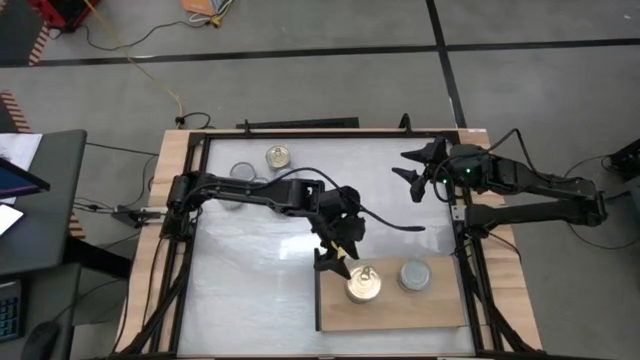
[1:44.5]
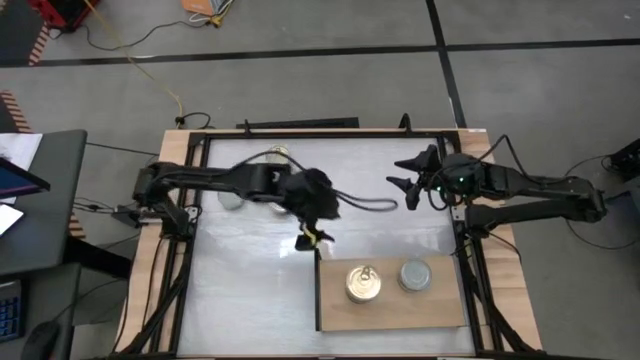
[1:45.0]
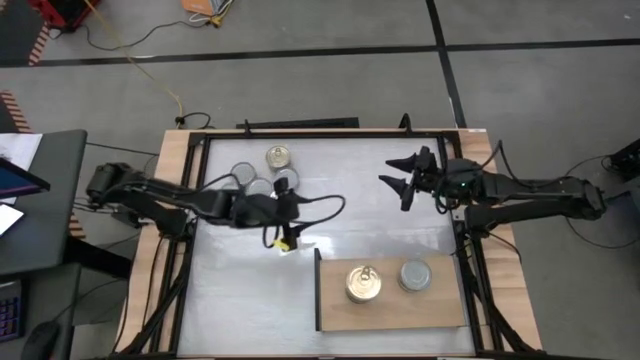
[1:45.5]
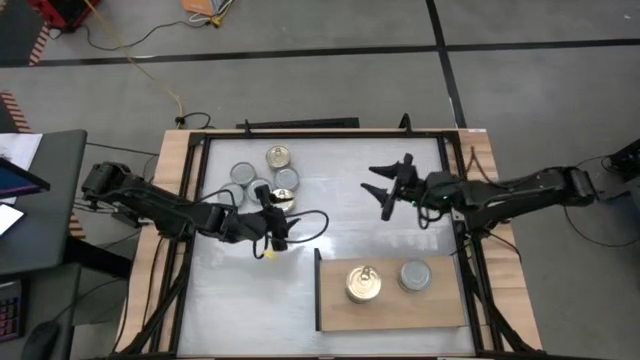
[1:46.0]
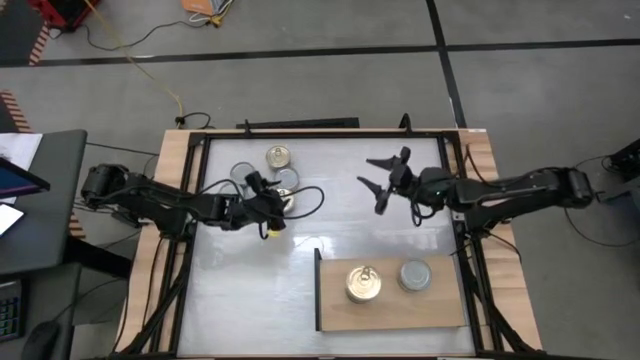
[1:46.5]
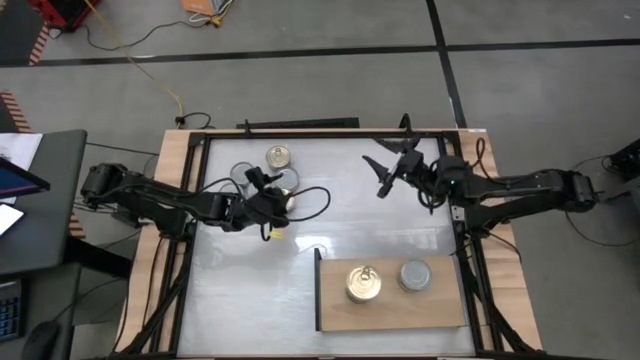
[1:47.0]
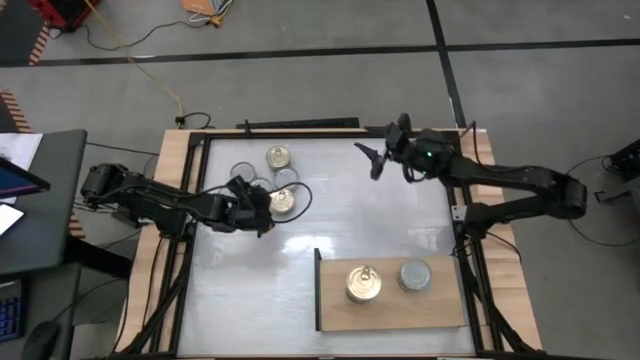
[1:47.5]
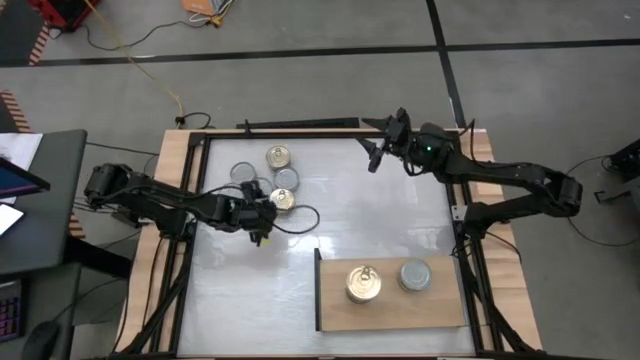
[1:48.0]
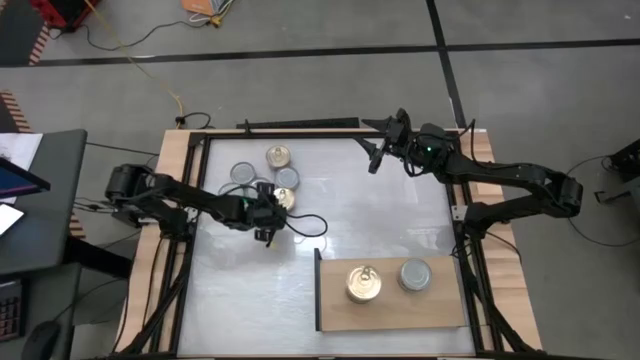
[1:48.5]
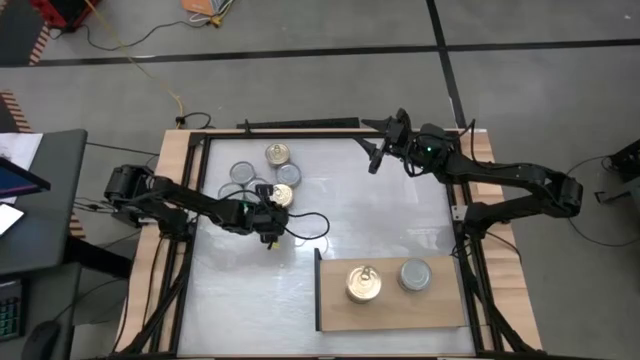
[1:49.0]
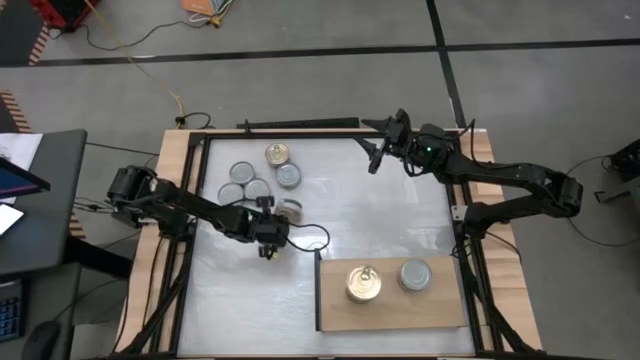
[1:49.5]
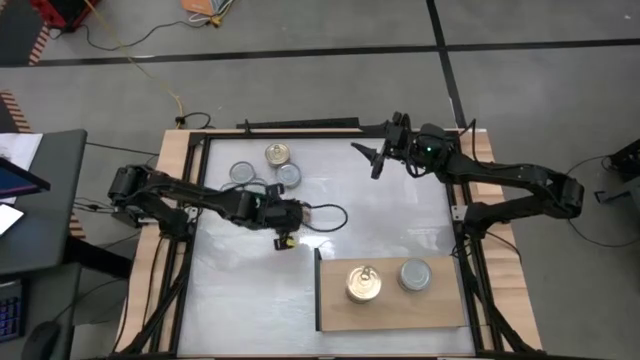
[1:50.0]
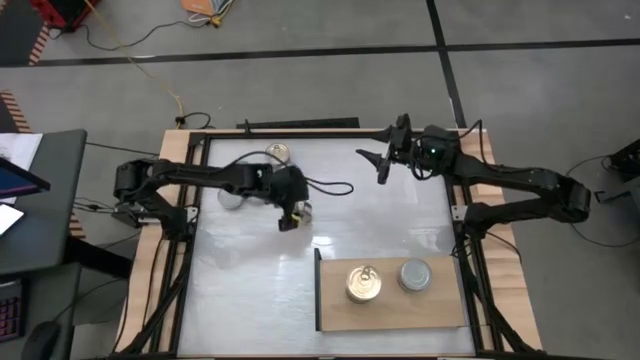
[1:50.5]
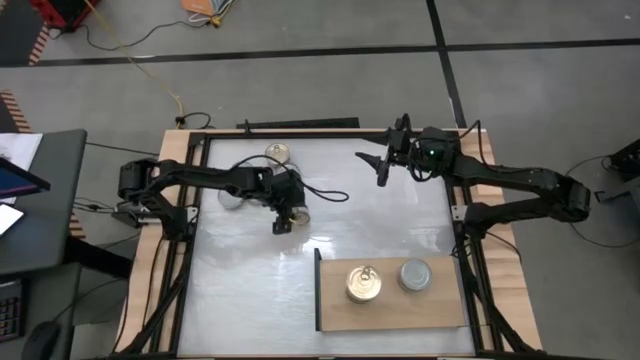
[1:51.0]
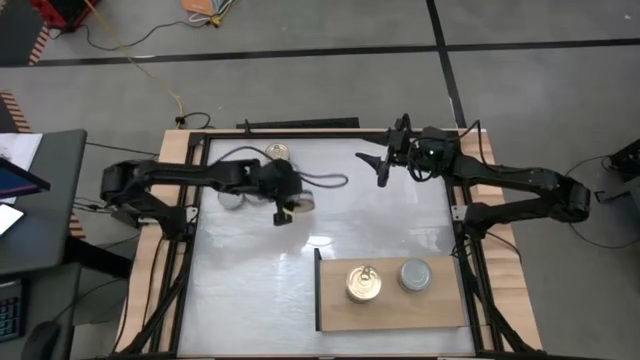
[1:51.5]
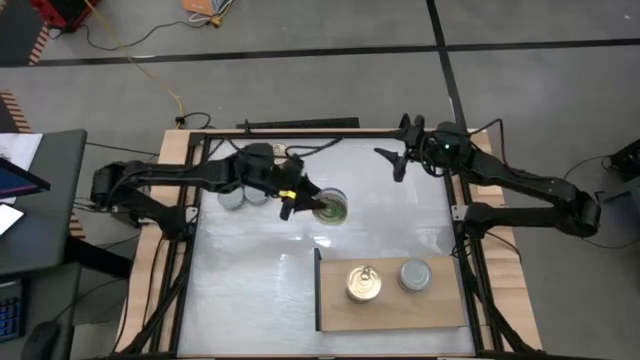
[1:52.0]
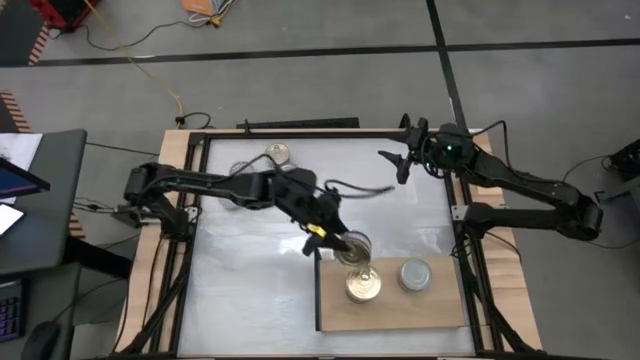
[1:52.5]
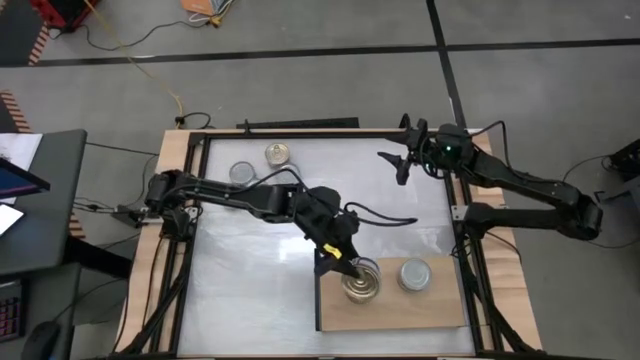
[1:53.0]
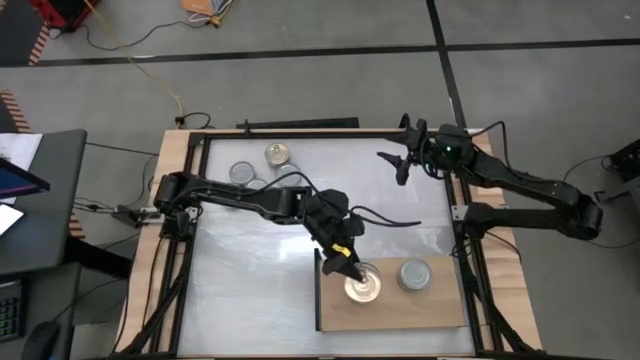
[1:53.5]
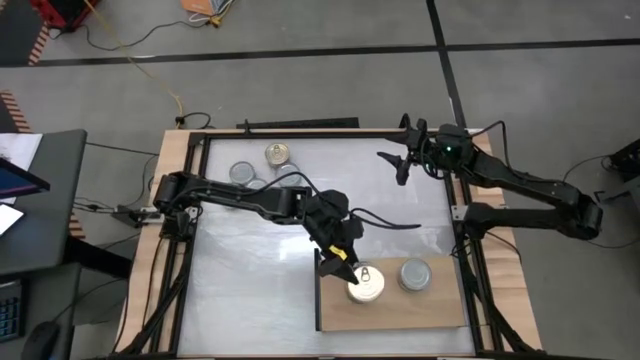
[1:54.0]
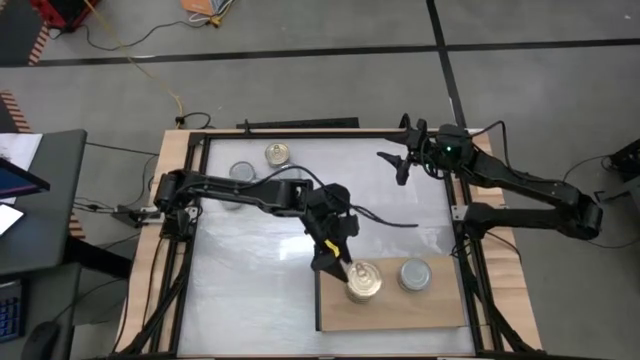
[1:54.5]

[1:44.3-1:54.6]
Task: Stack canned seafood by type on shelf
Stack the blue pink tuna can on top of the blue pink tuna can on the shelf

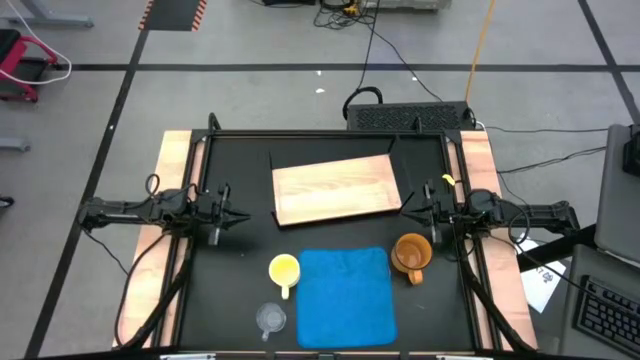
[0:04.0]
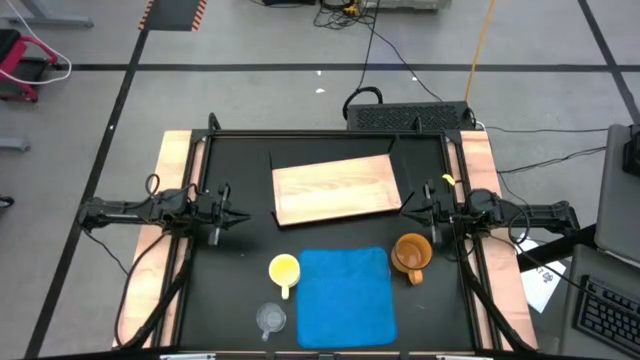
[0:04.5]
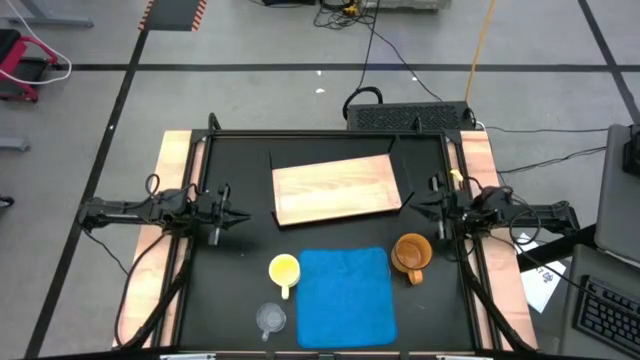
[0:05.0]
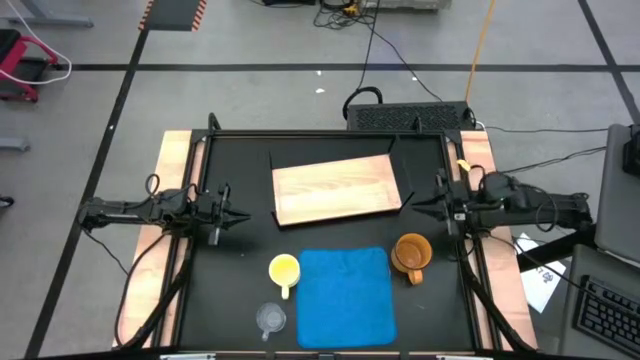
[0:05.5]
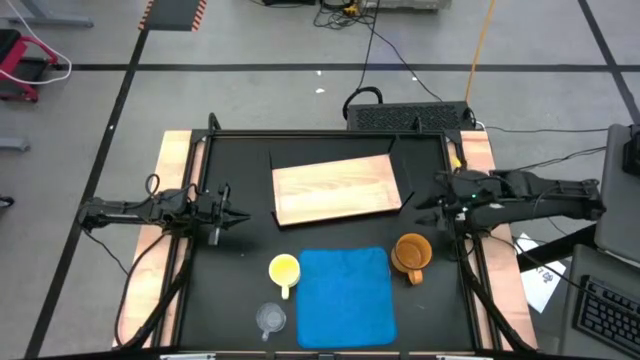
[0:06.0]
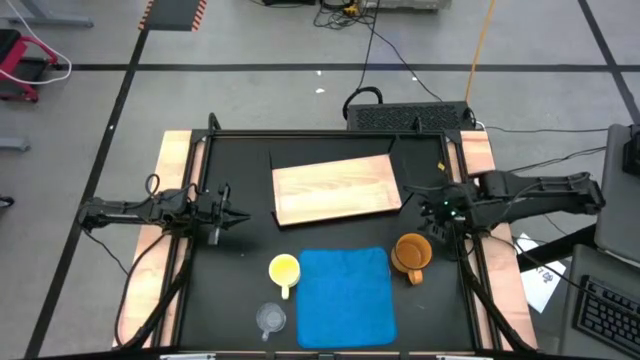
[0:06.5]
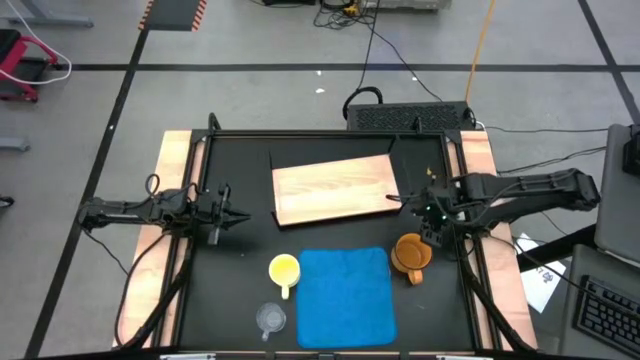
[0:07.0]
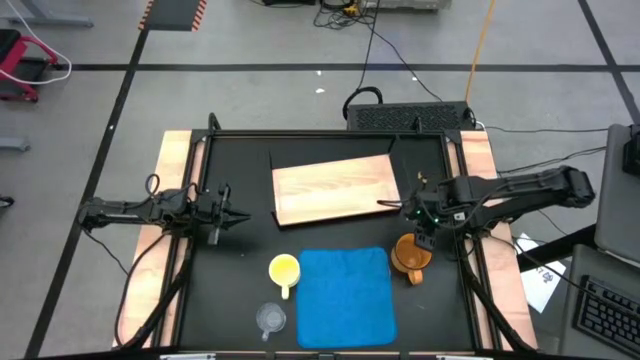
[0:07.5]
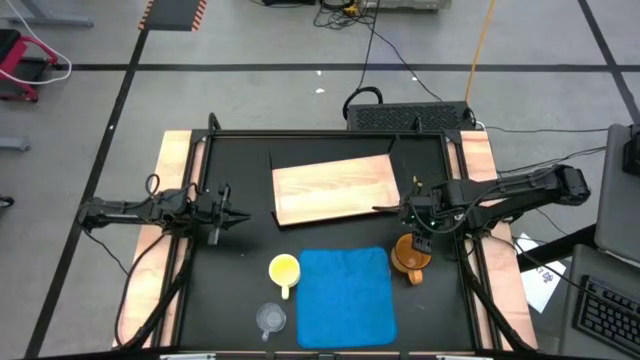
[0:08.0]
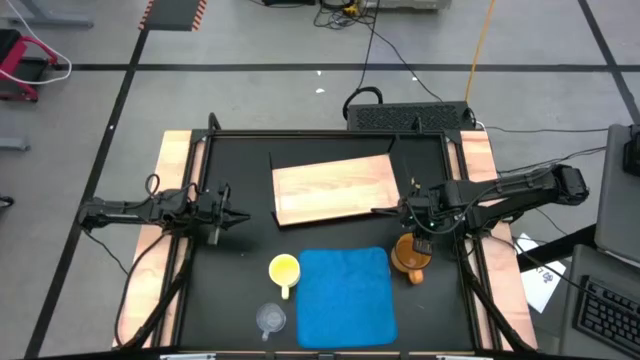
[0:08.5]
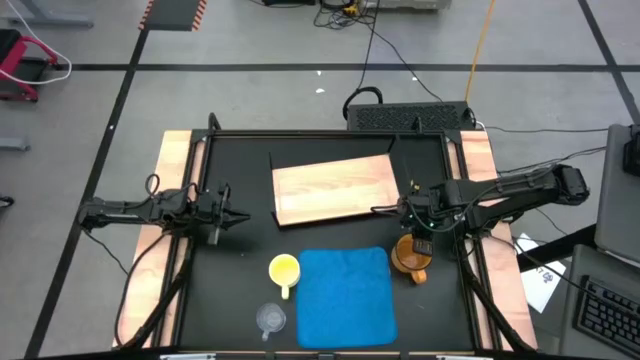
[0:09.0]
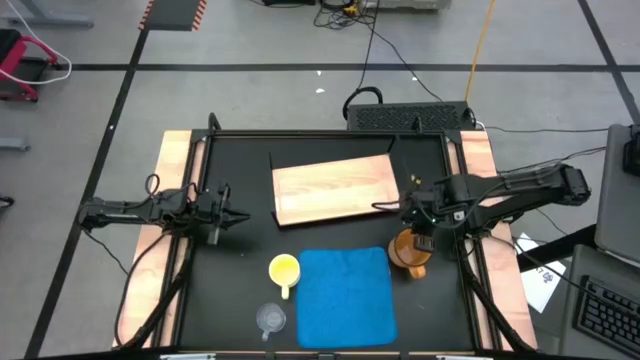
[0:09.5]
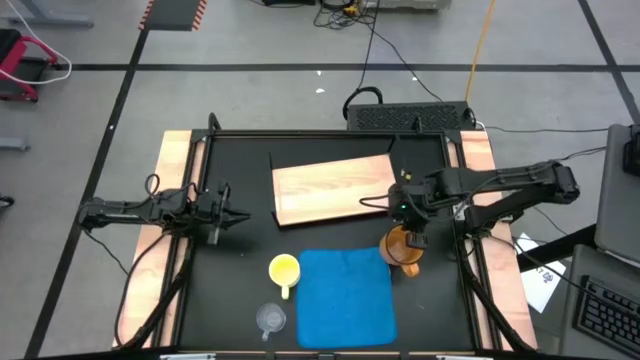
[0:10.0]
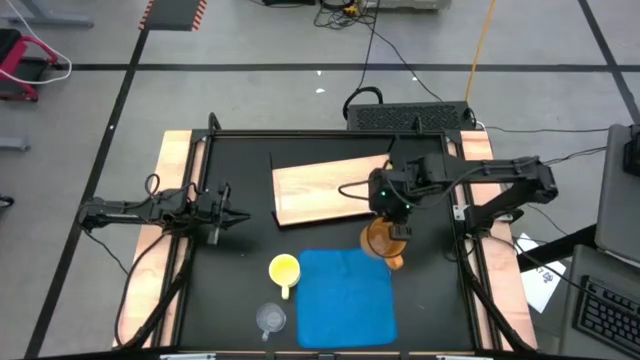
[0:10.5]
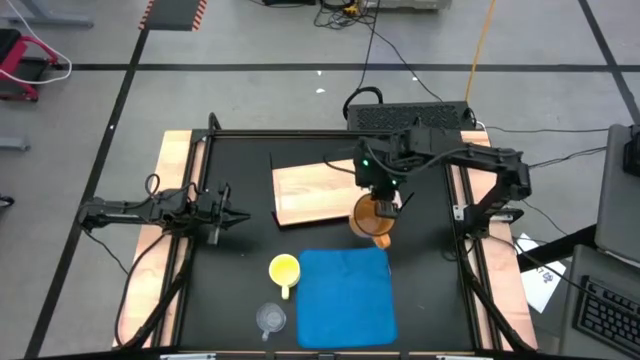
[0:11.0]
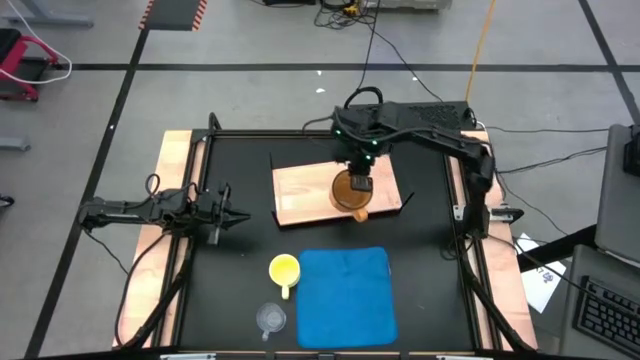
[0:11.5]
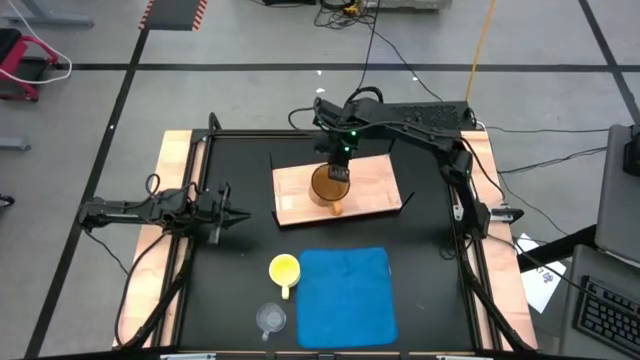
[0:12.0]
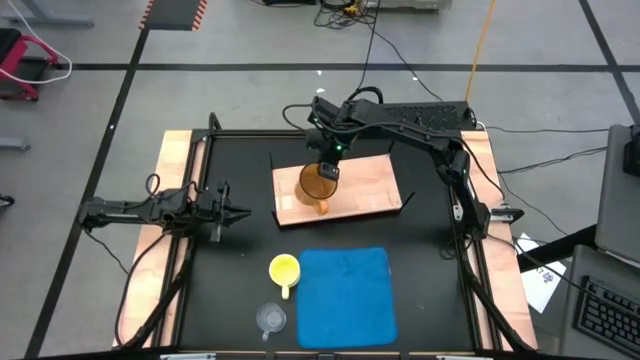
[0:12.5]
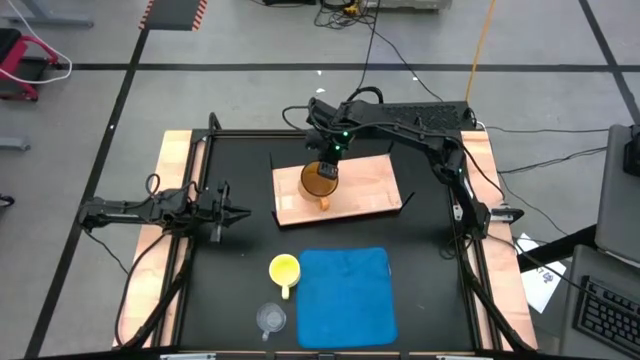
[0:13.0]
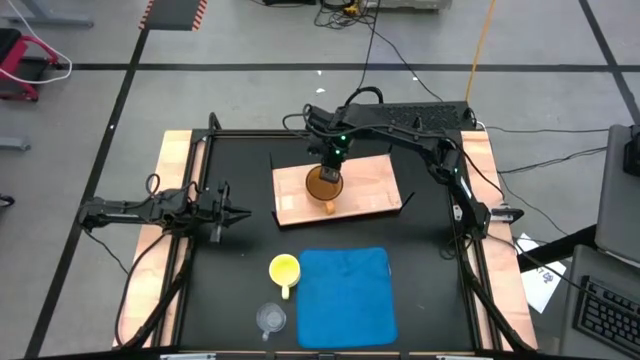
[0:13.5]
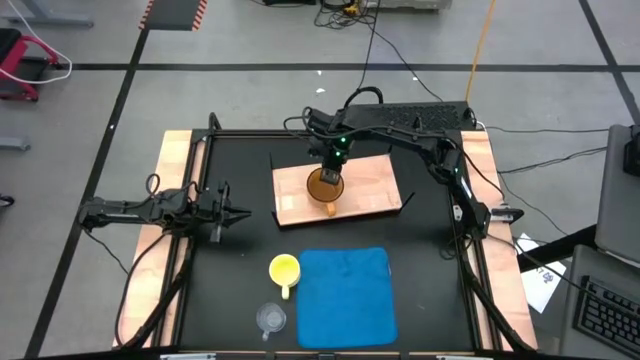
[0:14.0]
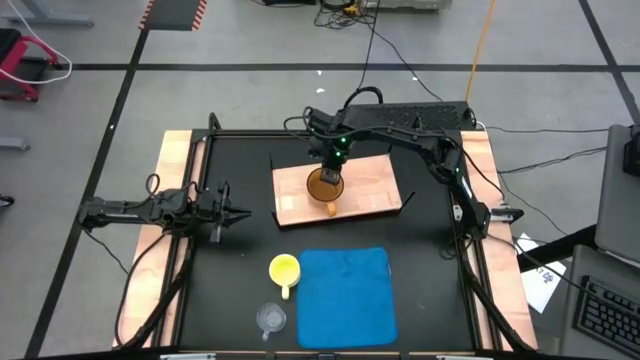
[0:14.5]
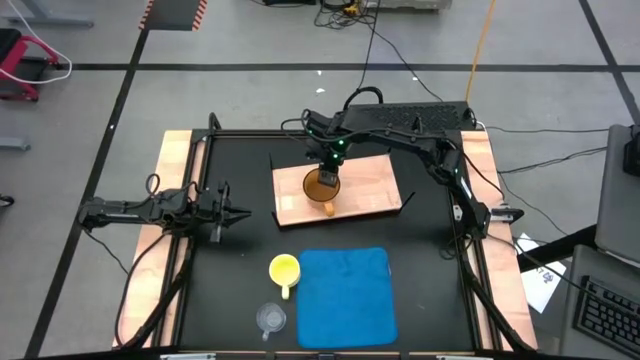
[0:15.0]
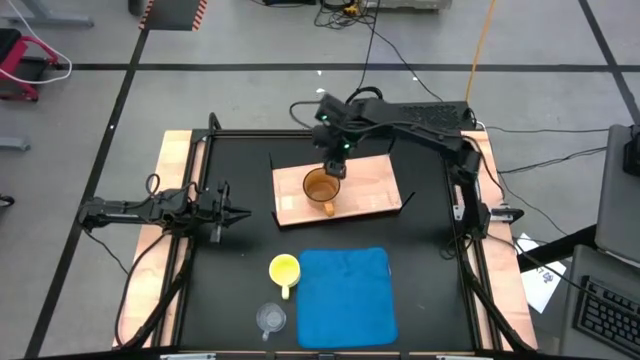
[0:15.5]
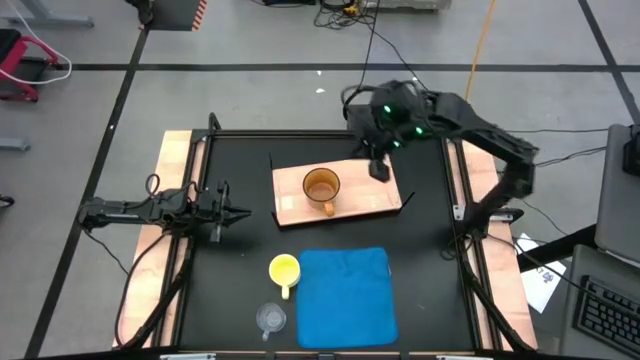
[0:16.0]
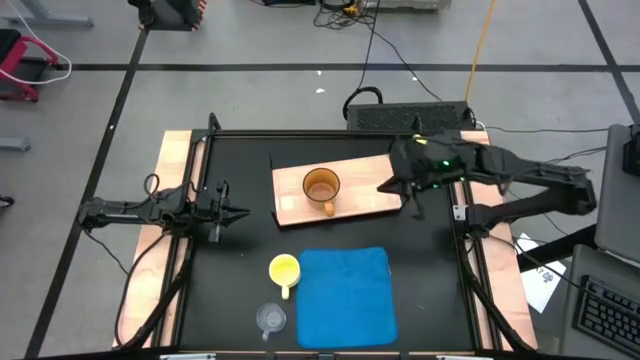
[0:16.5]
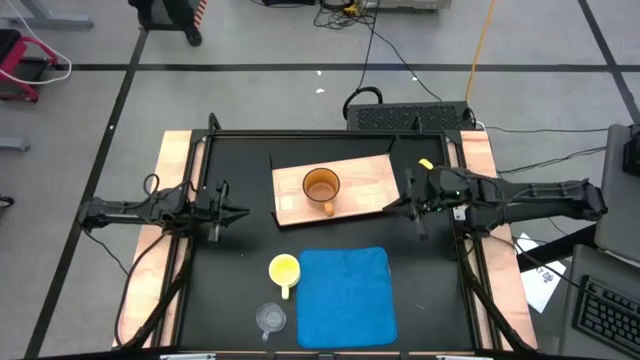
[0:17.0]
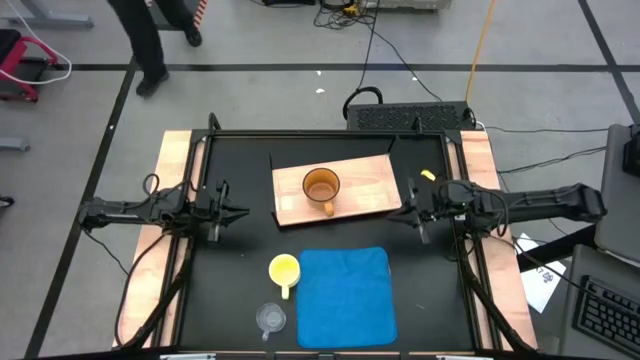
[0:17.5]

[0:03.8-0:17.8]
Task: Stack small to large cups/mugs on shelf
Put the orange mug on the shelf
